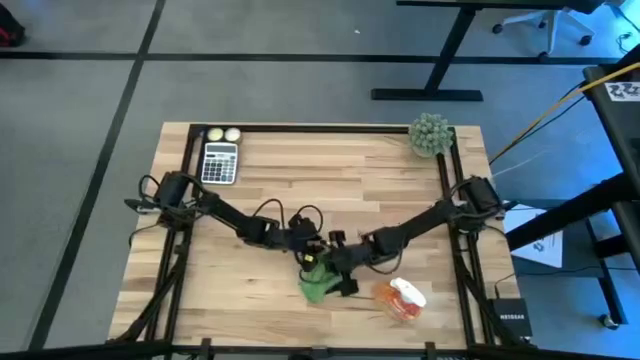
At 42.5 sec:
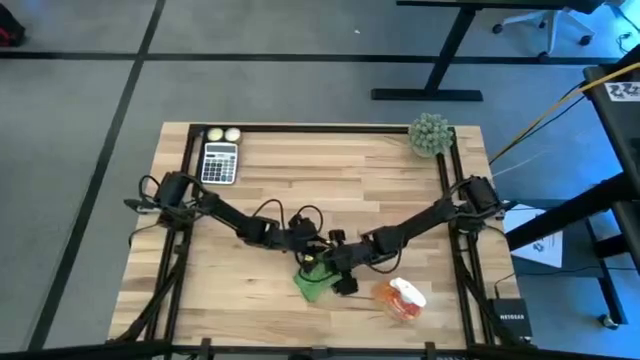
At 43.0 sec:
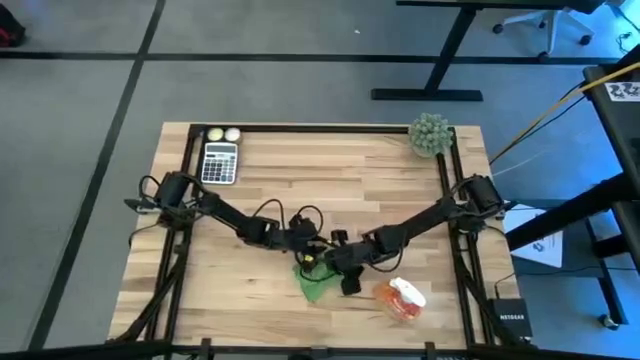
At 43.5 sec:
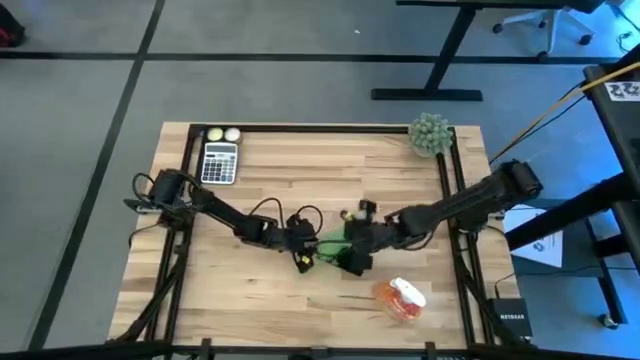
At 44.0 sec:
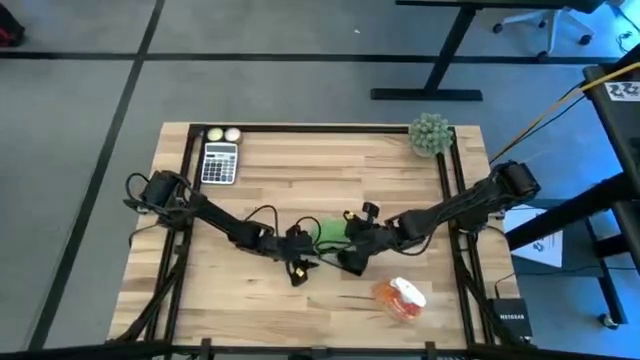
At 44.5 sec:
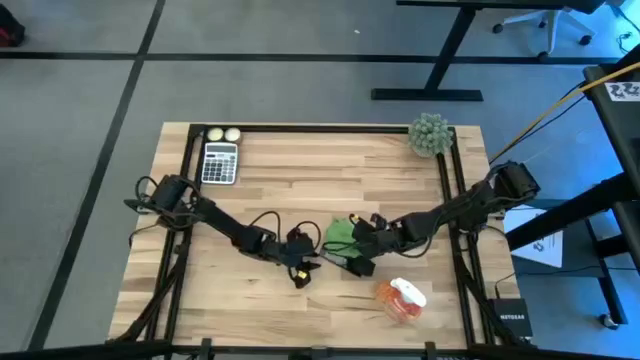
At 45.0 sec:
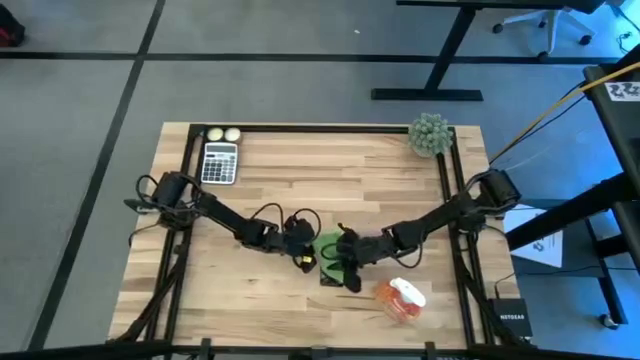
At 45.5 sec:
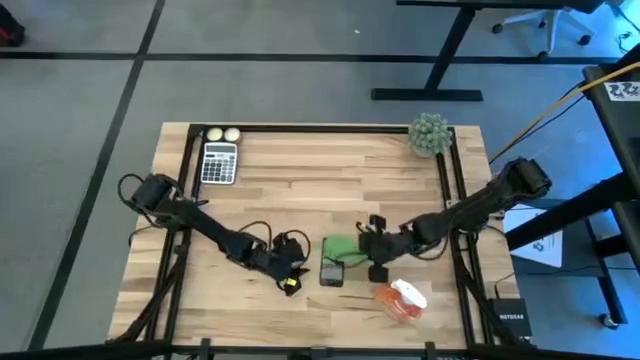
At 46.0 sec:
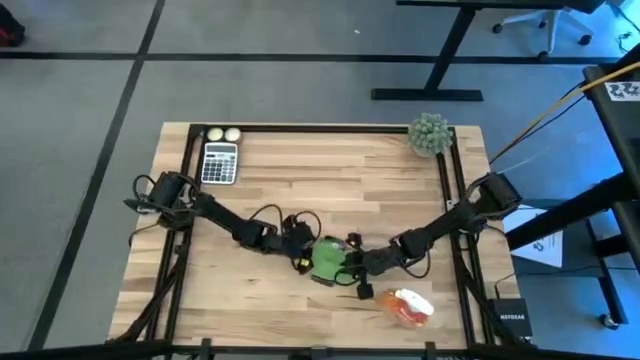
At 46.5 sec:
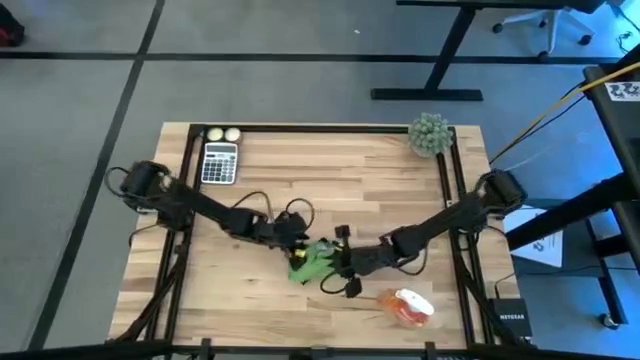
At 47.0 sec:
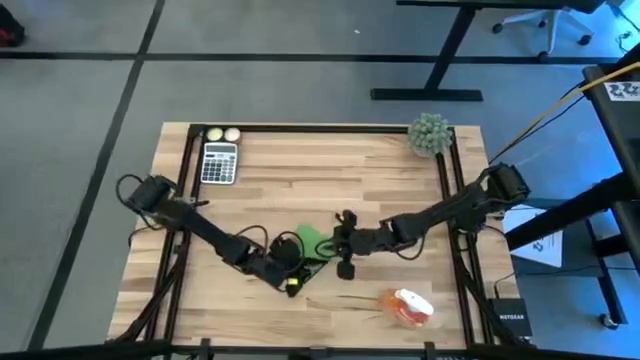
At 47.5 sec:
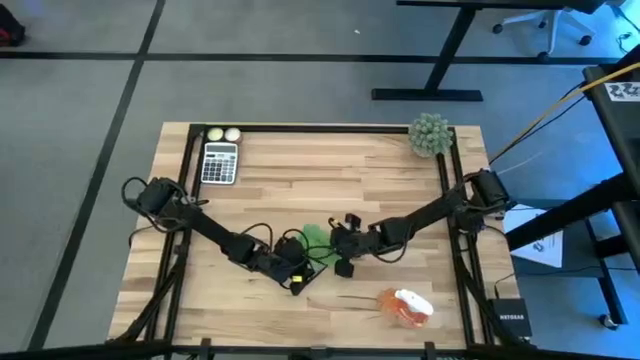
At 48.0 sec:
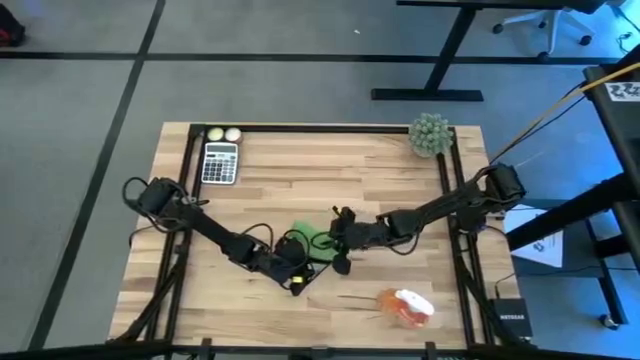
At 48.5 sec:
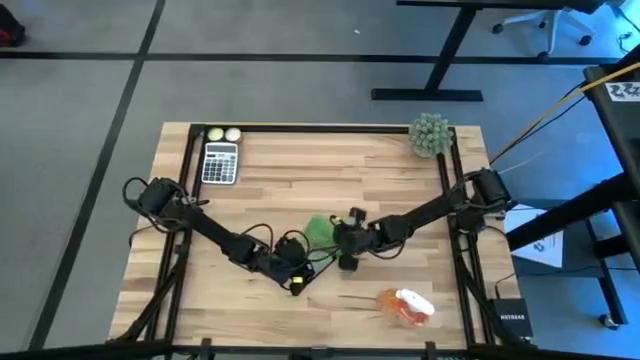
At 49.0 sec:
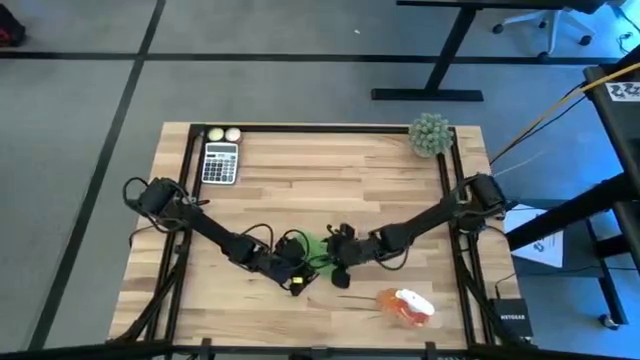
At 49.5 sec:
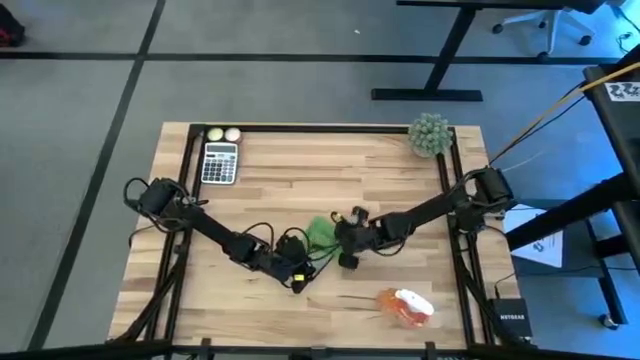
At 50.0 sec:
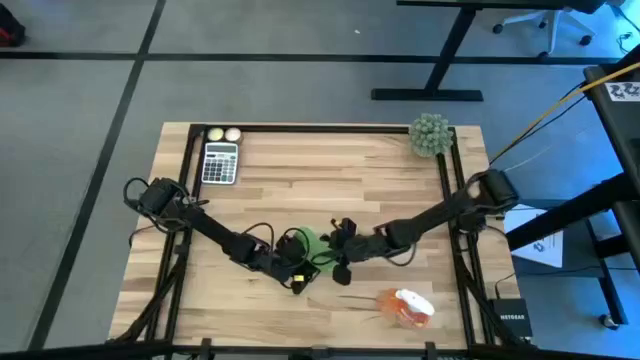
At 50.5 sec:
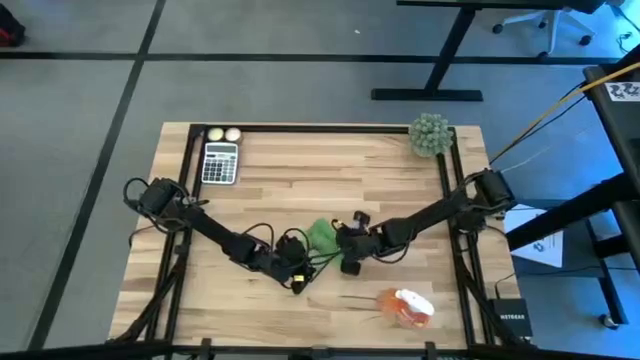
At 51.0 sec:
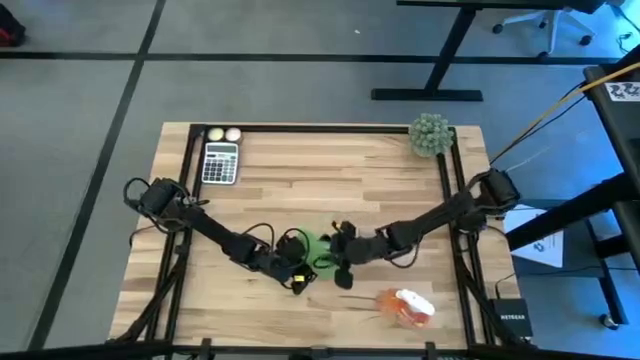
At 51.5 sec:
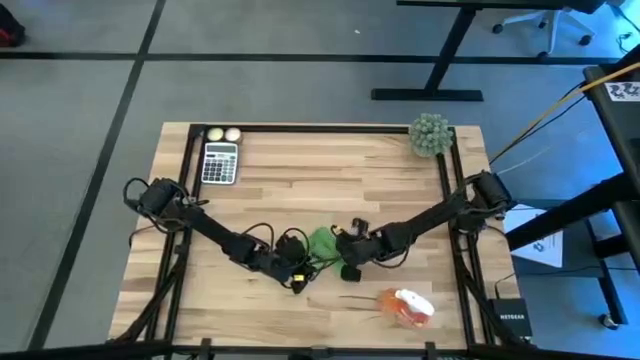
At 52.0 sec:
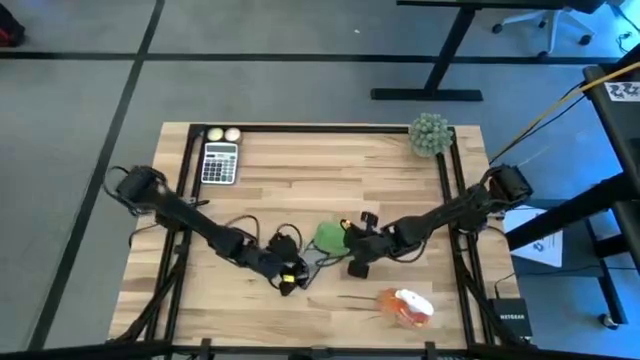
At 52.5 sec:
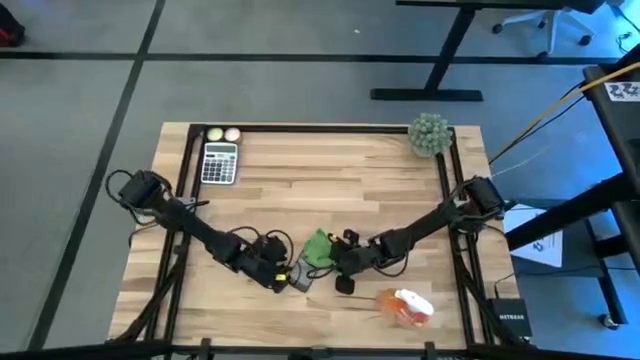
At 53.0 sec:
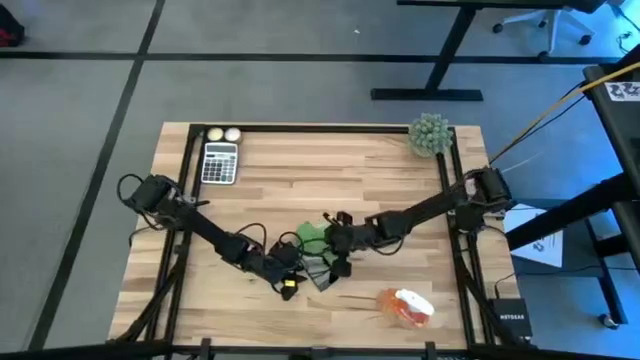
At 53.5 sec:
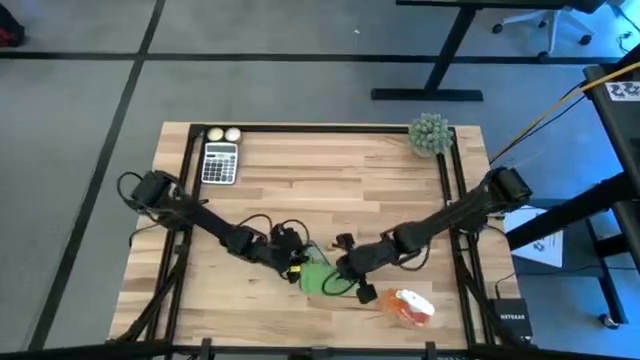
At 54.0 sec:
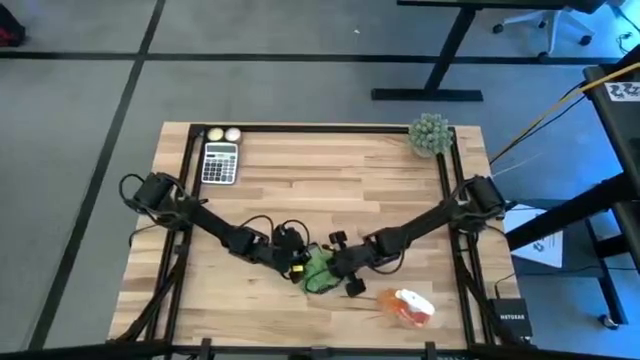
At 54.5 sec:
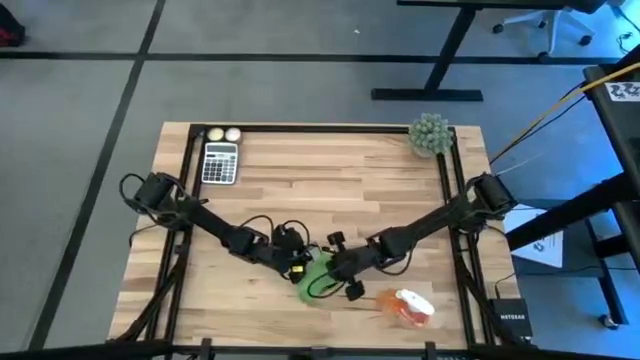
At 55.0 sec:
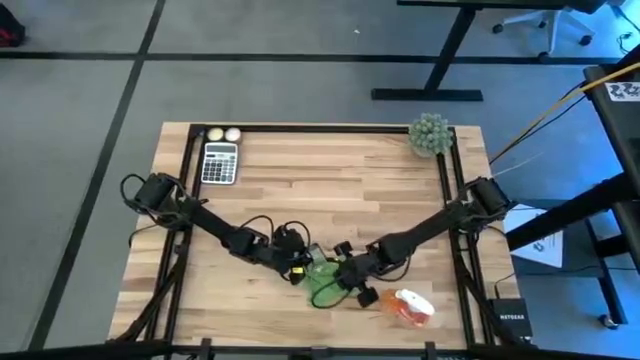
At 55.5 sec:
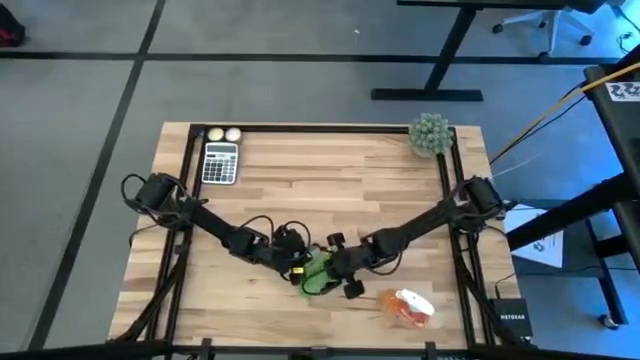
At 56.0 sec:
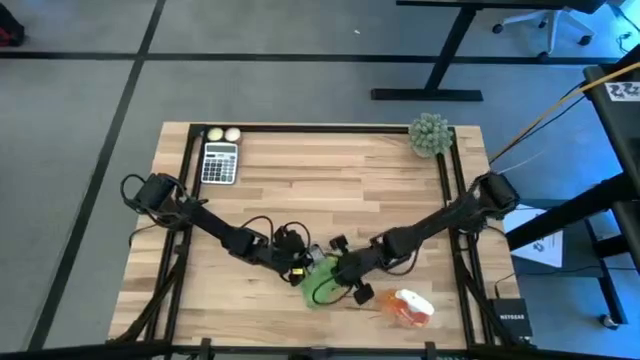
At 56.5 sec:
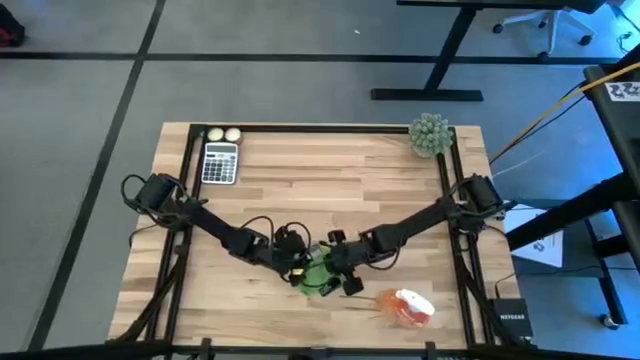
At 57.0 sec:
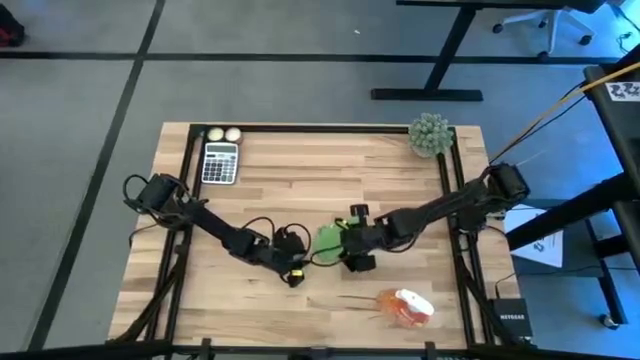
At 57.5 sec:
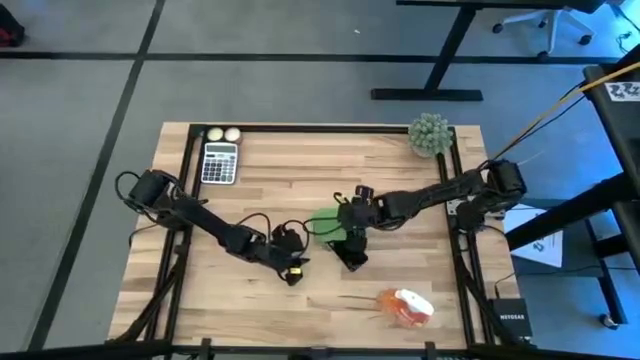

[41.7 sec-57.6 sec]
Task: Apply microfiber cloth
Wipe the front of the black cellphone using the green microfiber cloth

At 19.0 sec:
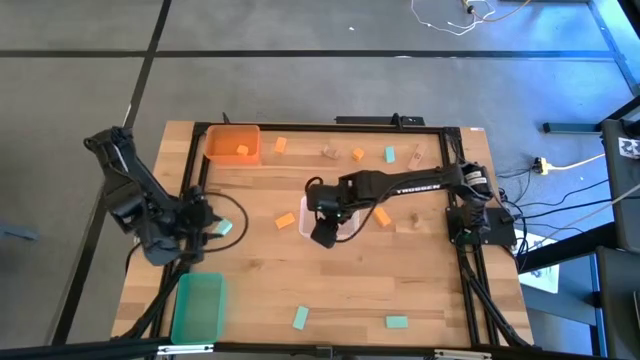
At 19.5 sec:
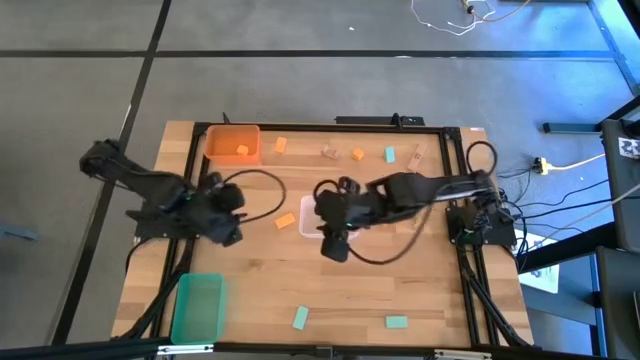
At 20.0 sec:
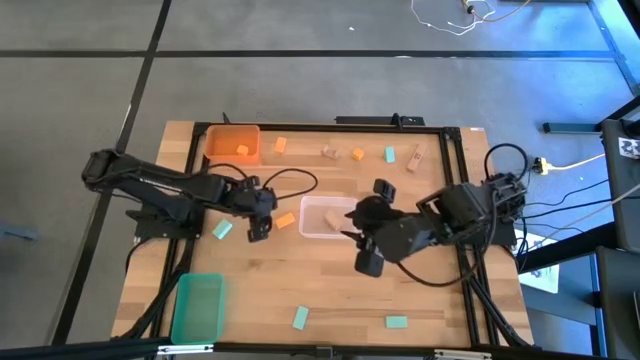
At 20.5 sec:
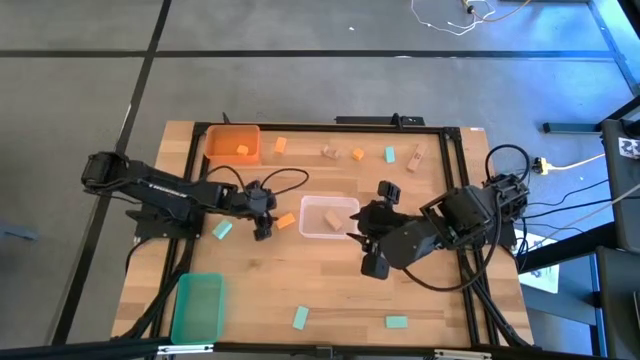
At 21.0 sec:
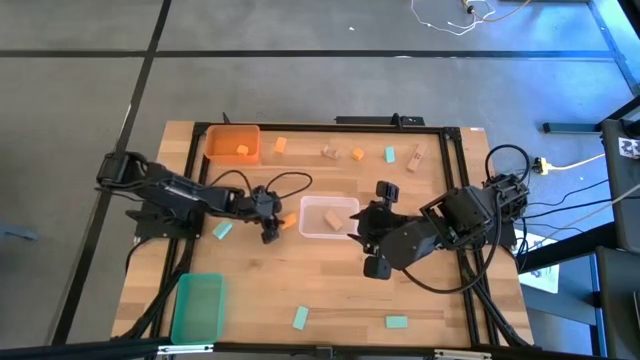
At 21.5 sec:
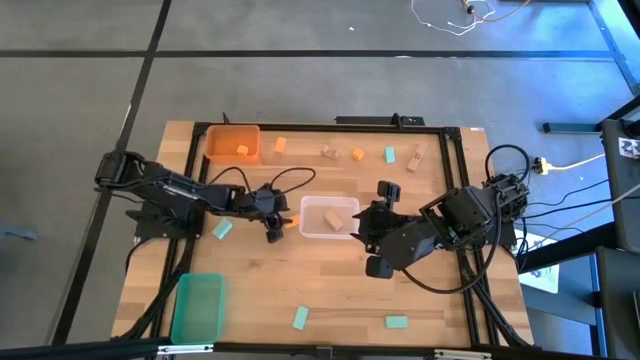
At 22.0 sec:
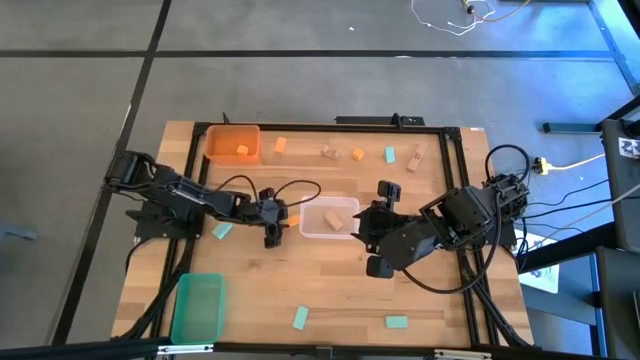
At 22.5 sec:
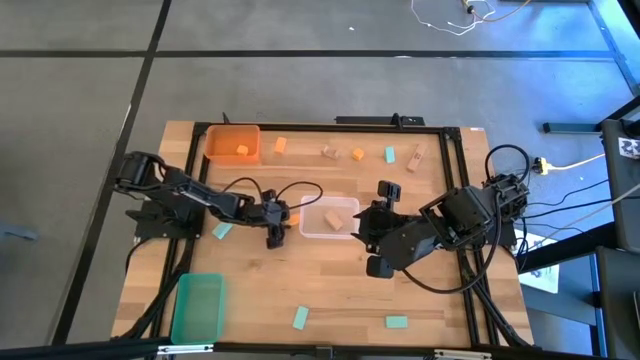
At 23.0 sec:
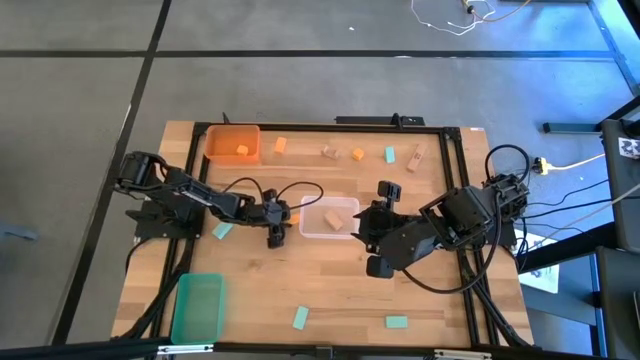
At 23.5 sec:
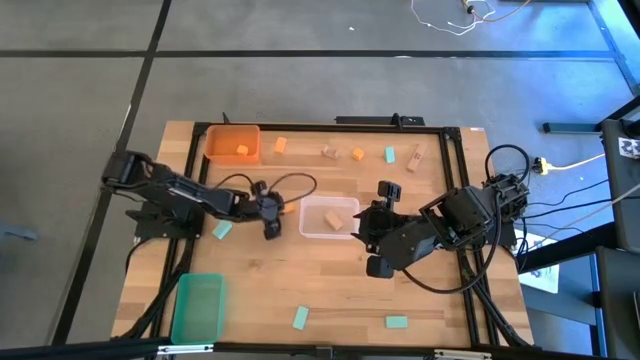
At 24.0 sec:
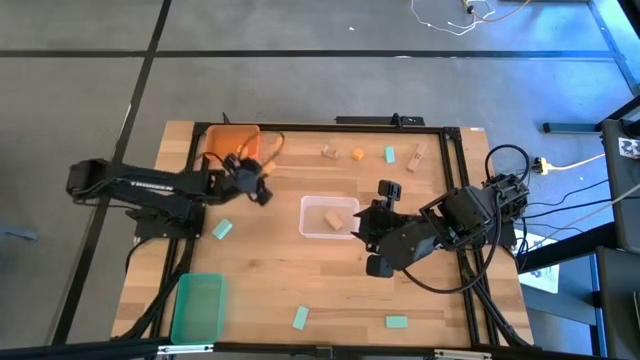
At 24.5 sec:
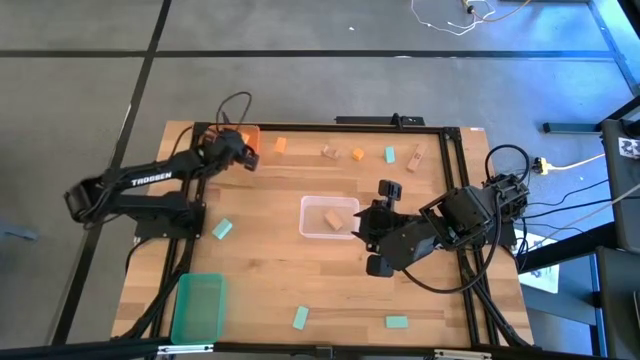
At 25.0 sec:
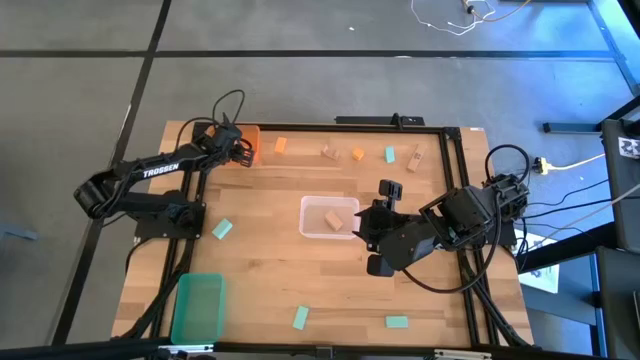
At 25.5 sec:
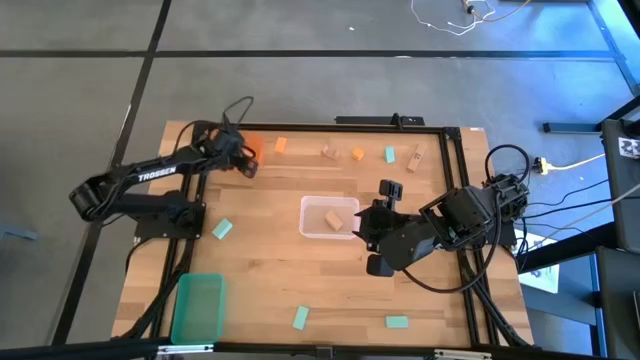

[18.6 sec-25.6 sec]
Task: Sort & place blocks by color
Put the yellow block into the orange bin
